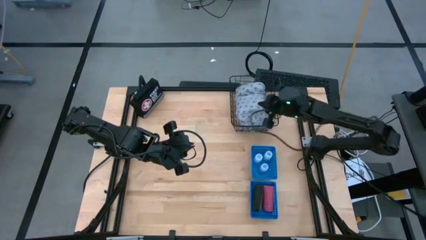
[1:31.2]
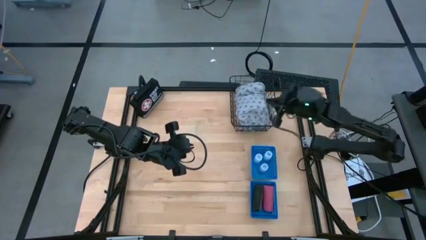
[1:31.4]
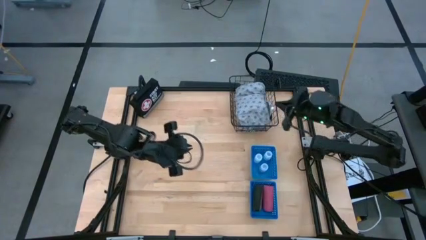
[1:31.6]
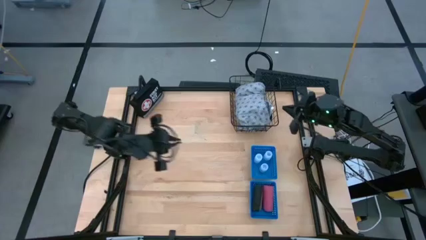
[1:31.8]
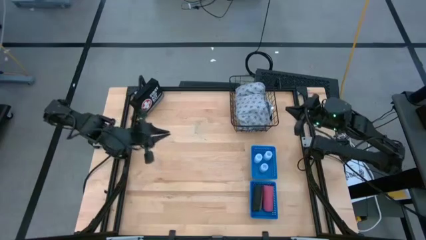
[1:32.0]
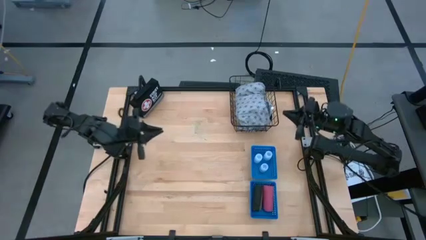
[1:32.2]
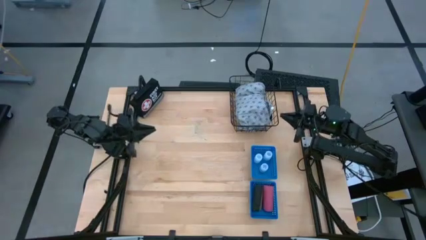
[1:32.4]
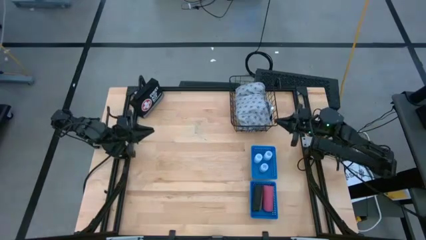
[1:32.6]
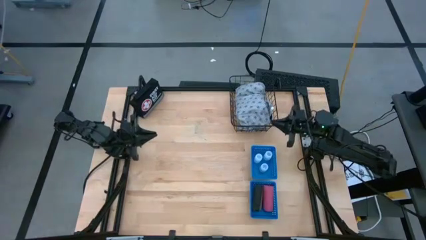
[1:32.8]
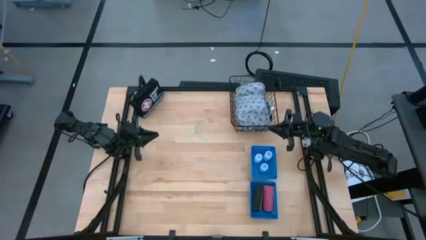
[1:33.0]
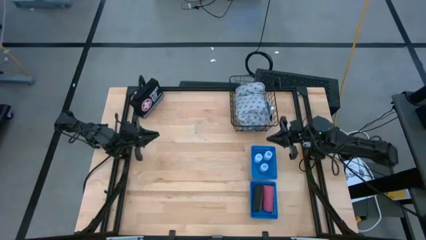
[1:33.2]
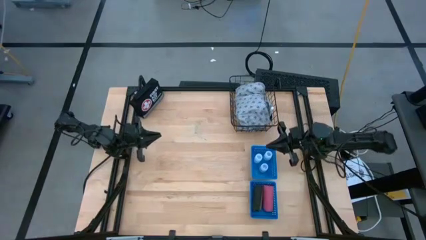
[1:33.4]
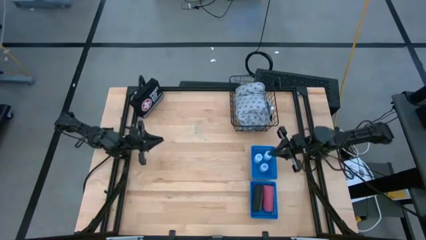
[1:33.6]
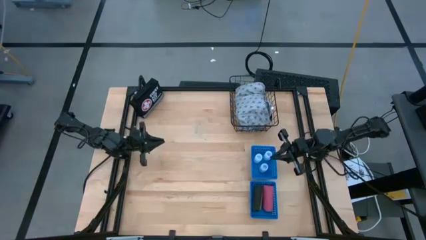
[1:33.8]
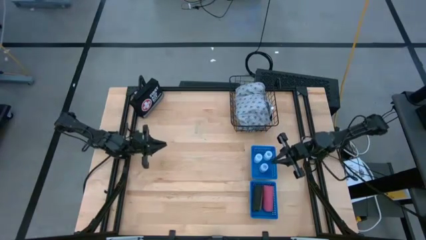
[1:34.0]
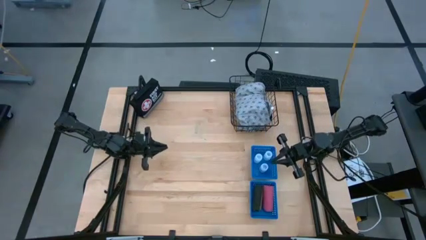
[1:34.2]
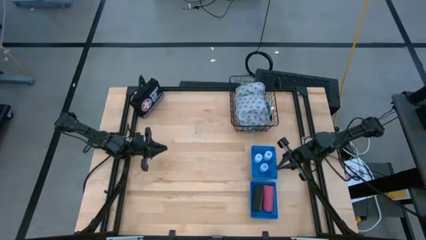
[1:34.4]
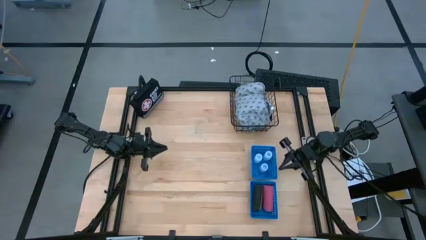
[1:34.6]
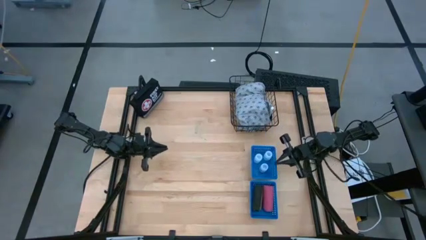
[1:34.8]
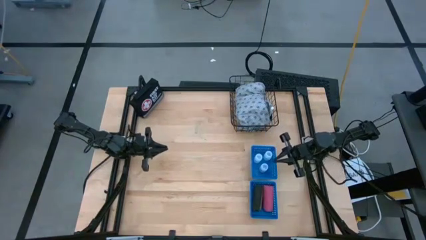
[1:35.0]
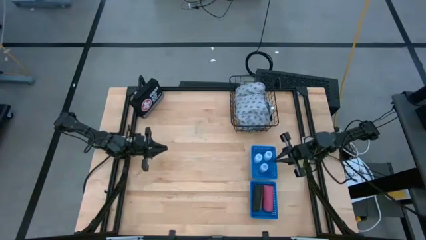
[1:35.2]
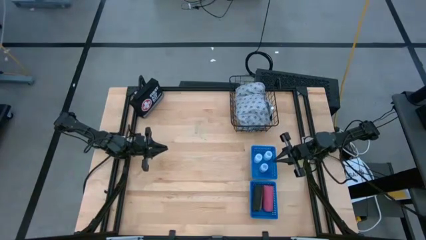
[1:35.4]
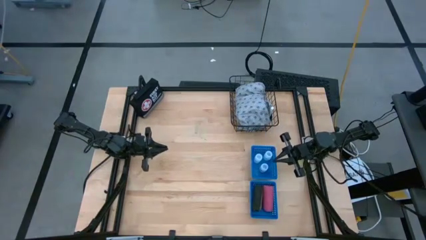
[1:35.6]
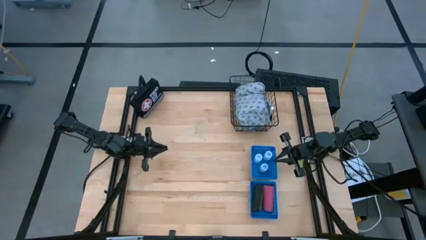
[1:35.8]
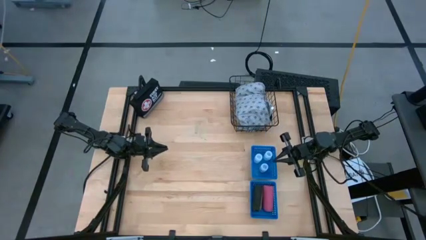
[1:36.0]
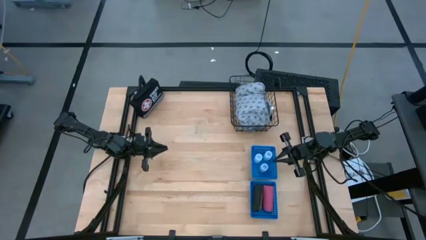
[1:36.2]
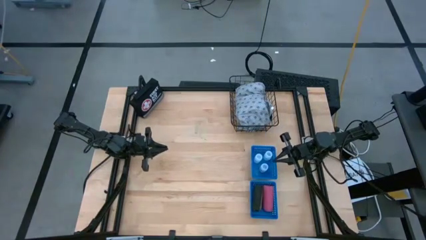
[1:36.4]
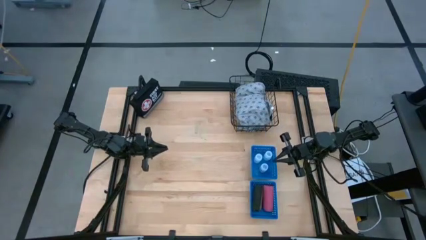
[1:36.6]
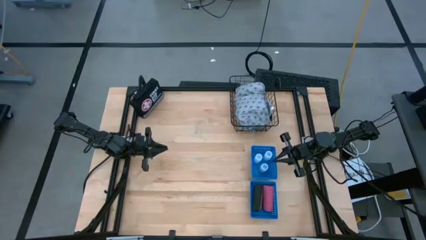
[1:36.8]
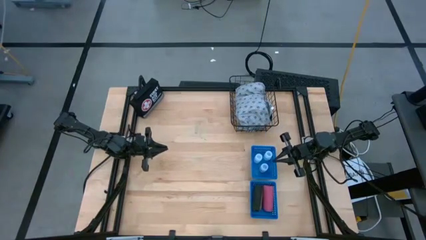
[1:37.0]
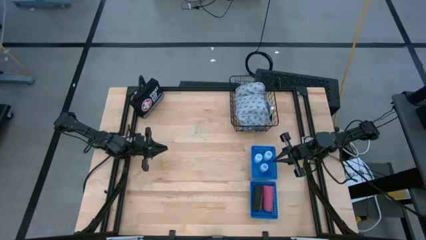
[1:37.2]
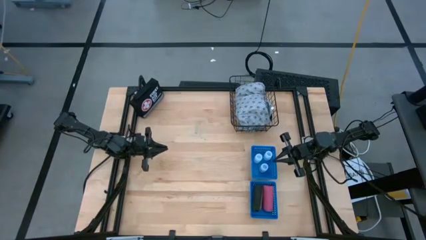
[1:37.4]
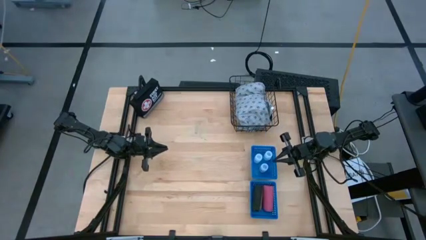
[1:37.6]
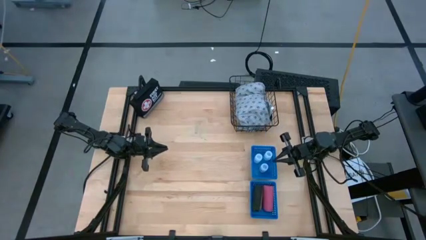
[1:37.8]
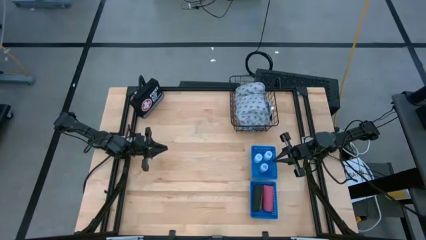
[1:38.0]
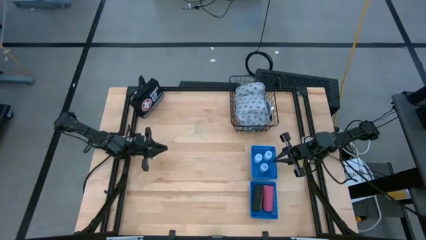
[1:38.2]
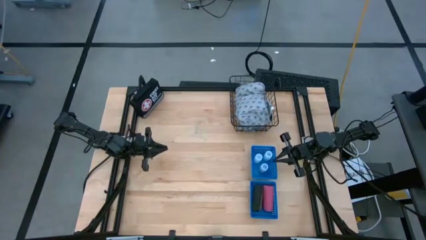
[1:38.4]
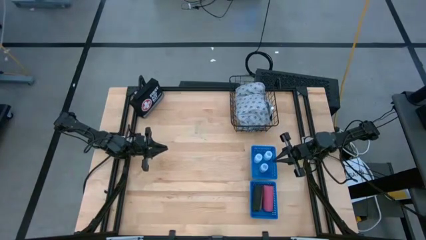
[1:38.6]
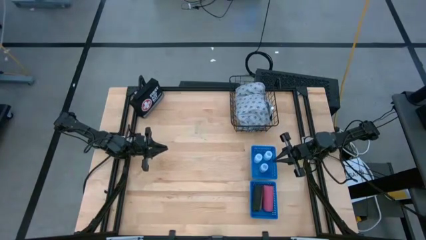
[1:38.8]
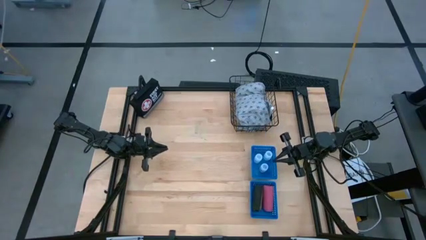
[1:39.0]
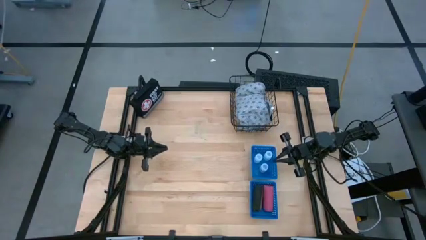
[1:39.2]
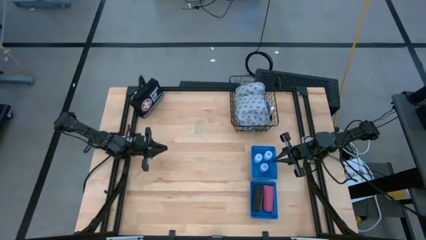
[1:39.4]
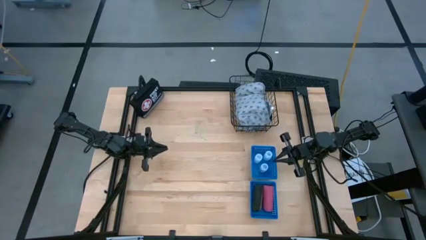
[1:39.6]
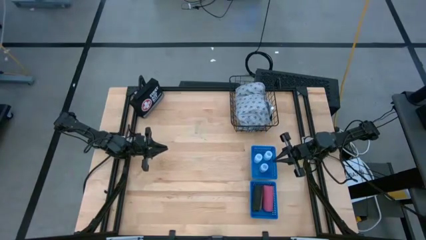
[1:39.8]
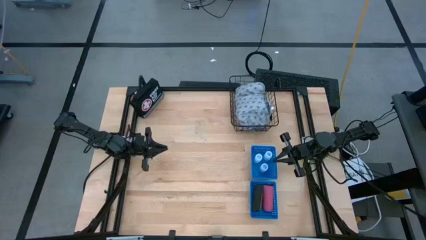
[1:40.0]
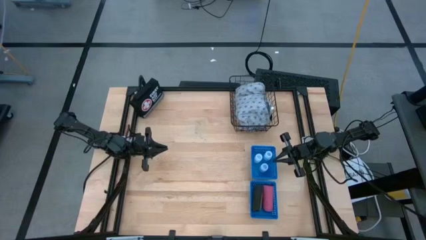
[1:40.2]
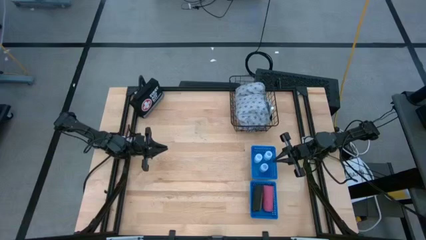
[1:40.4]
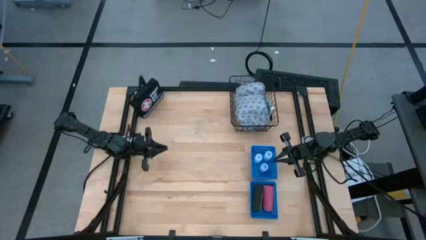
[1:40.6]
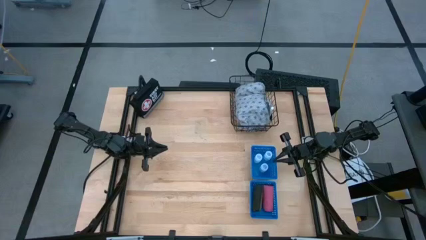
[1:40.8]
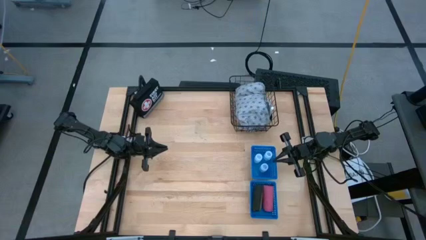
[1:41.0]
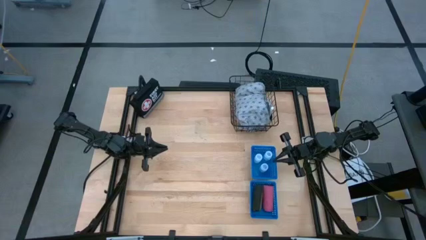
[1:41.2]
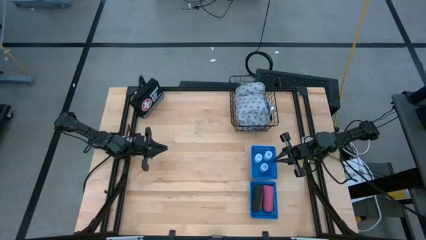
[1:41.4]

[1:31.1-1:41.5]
Task: Pick & Place Medicine items
Return to Home Position

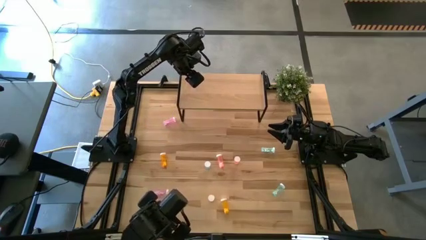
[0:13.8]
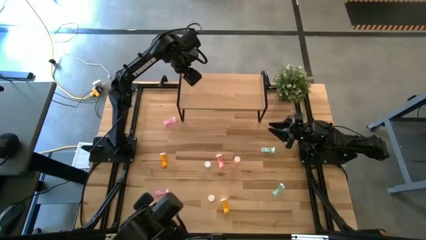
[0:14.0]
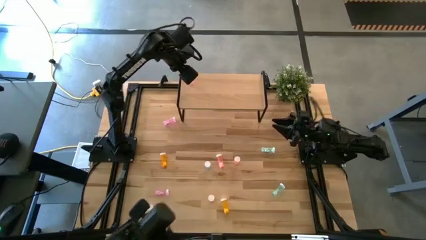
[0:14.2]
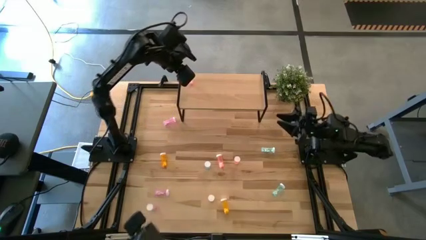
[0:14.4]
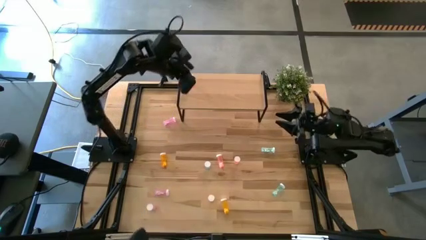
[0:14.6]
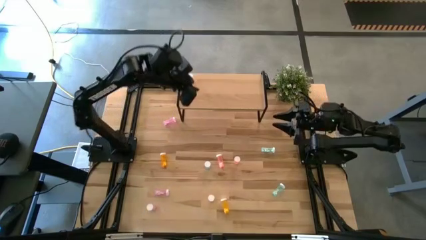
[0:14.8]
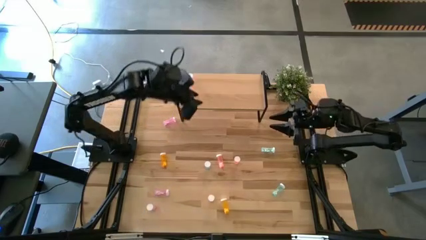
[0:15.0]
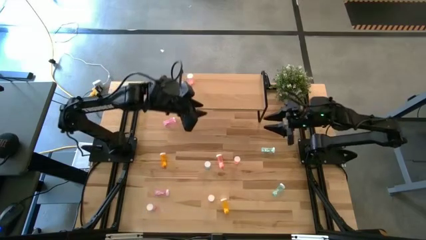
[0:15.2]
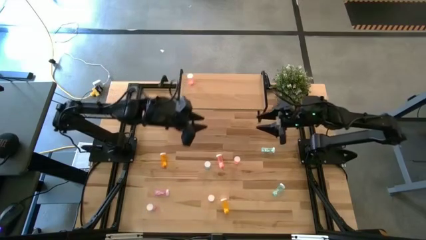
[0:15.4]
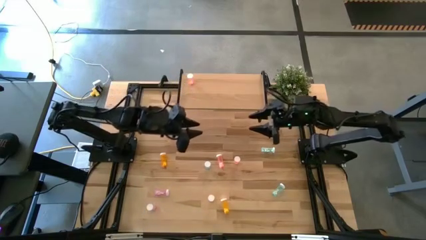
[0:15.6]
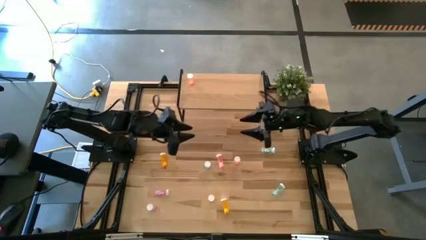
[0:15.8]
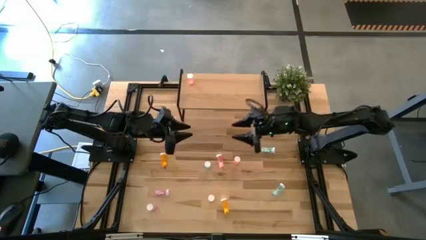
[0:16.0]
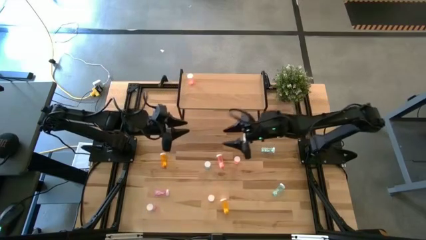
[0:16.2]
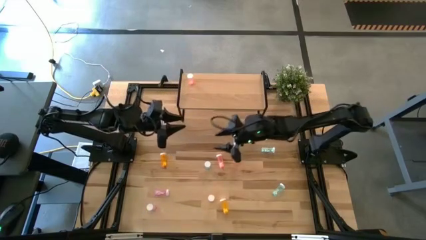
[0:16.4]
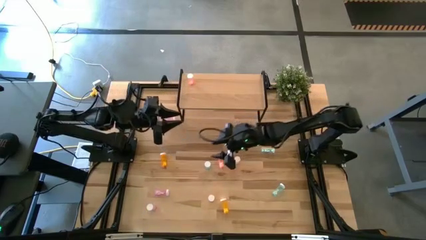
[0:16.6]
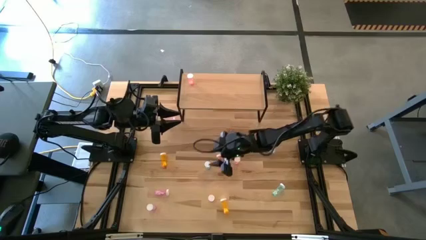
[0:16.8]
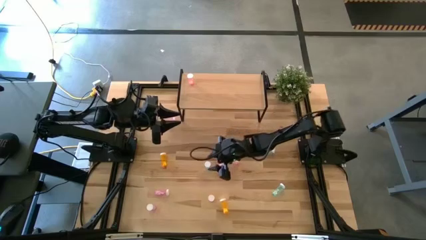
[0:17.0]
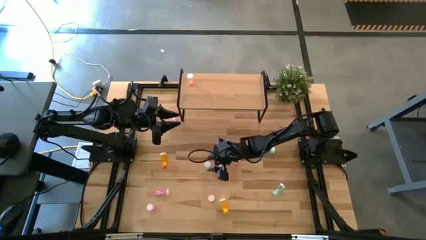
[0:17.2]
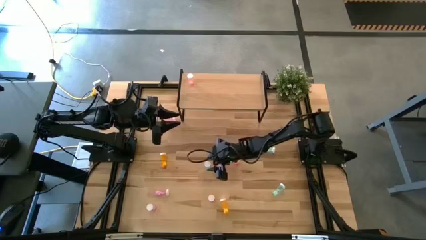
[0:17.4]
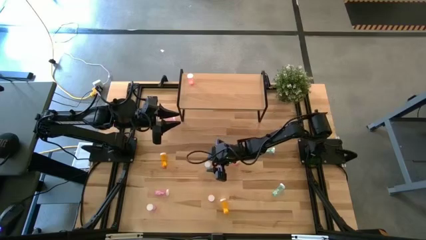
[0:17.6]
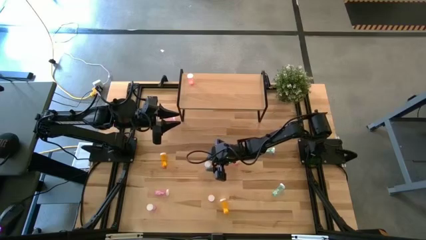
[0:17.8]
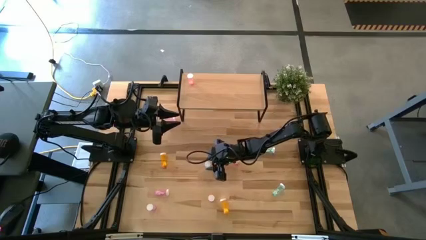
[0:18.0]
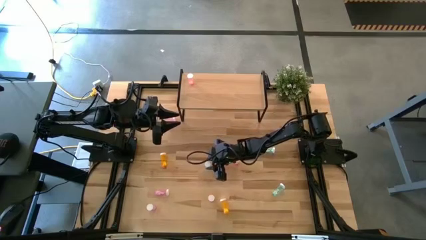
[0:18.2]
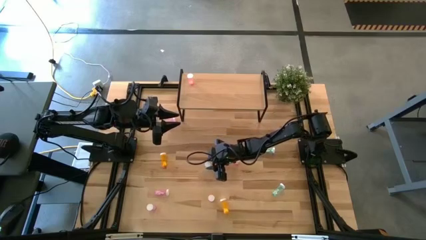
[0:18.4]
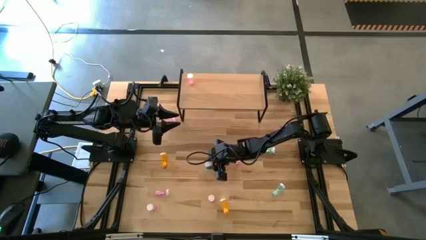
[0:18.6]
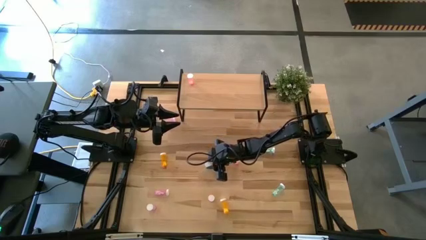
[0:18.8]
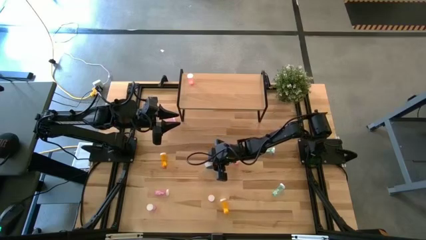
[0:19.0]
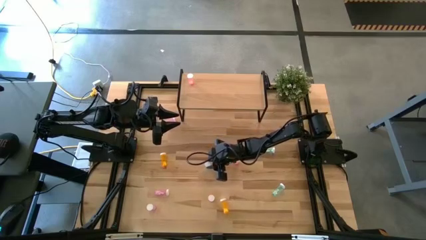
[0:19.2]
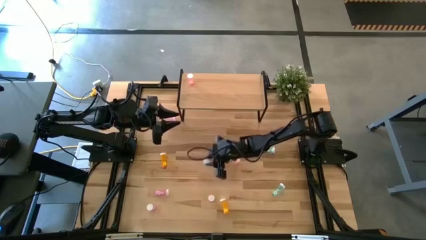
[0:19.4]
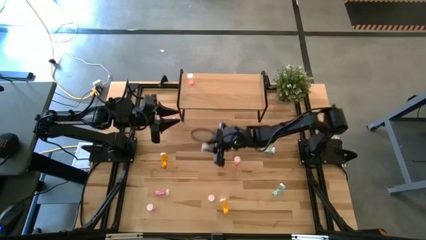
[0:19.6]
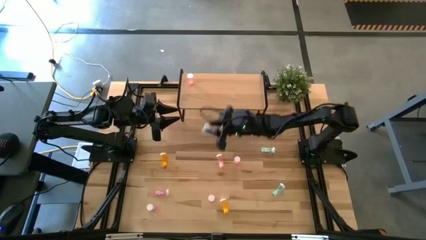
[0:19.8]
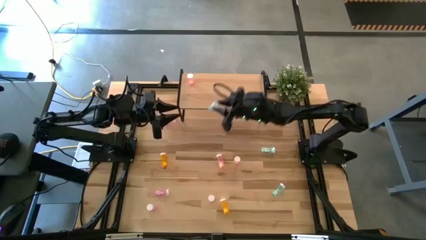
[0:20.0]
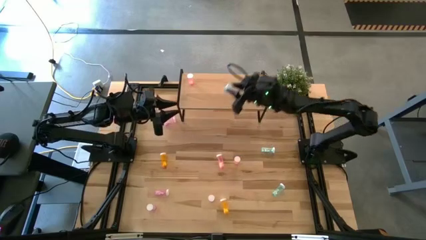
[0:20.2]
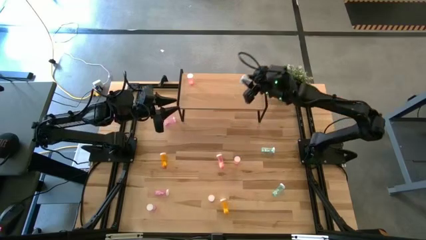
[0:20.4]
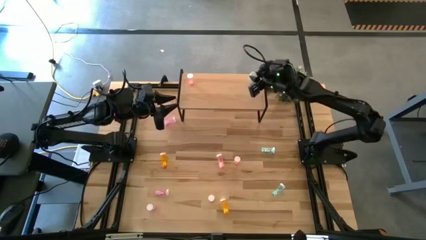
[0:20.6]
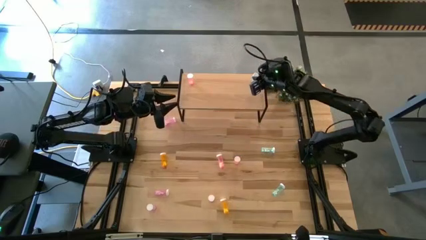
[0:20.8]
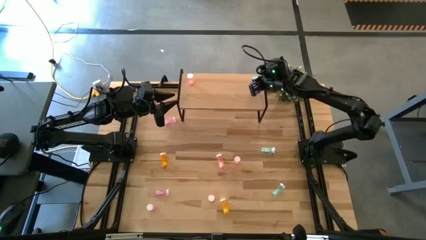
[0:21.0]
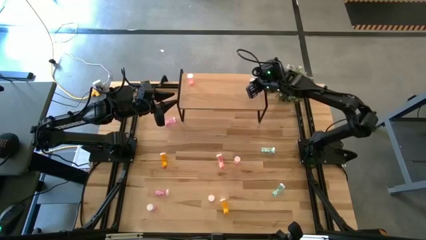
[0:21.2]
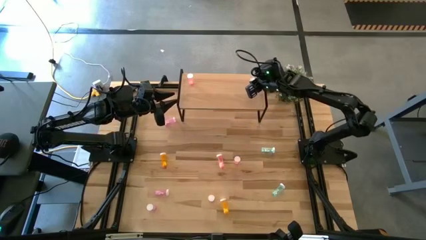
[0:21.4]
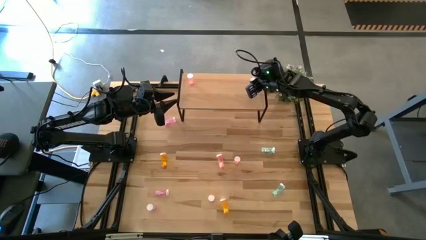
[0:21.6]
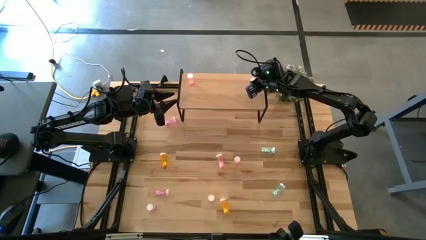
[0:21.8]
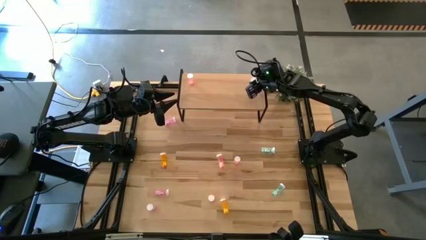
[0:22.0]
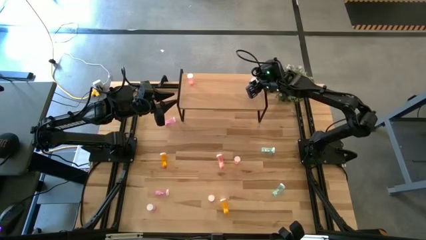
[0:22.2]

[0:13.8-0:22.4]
Task: Pick and place medicine bottles onto shelf by color
Put the middle blue pill bottle on the shelf
